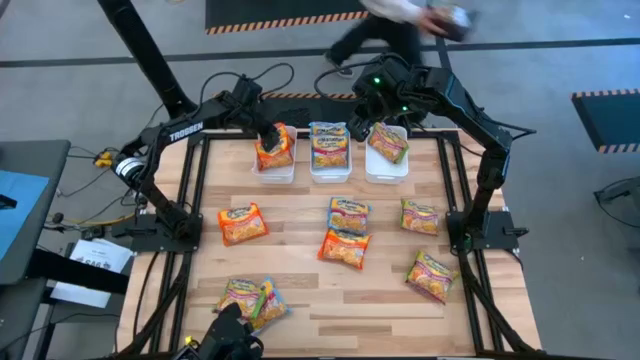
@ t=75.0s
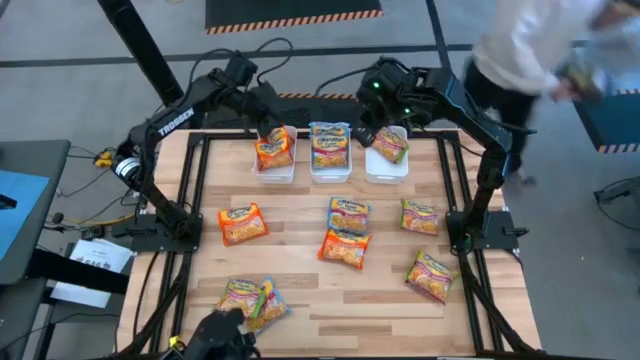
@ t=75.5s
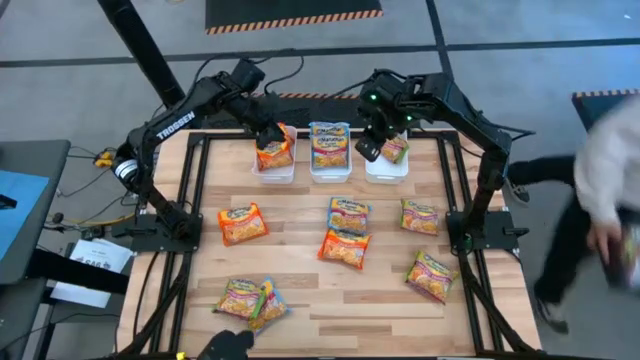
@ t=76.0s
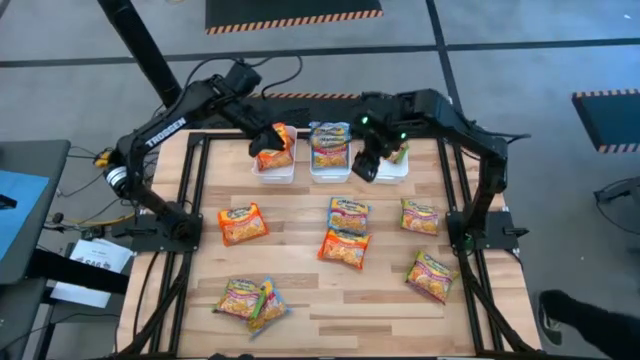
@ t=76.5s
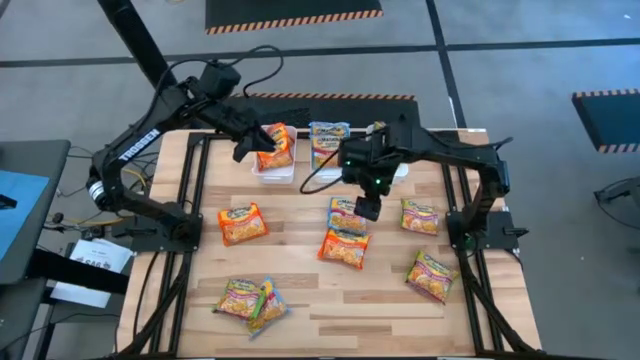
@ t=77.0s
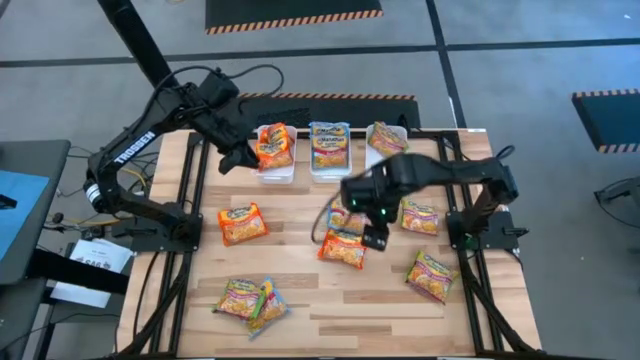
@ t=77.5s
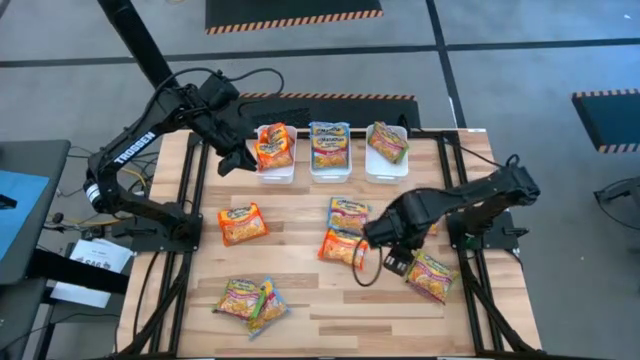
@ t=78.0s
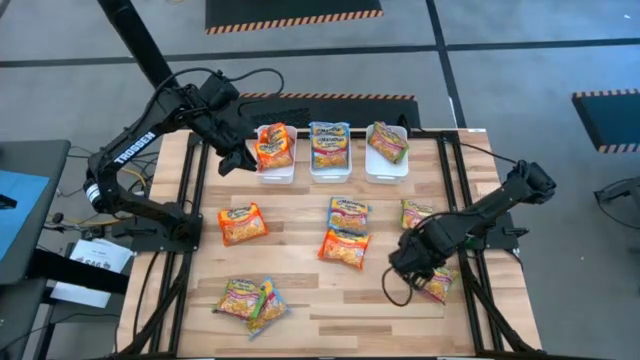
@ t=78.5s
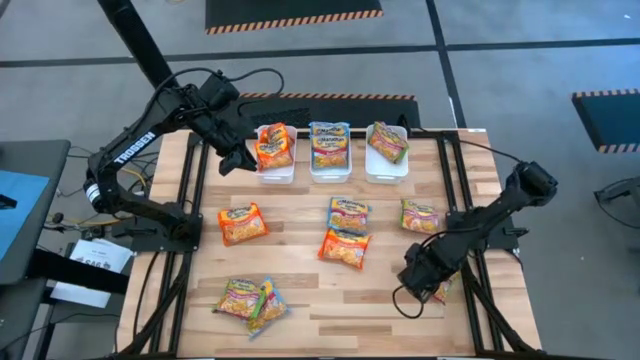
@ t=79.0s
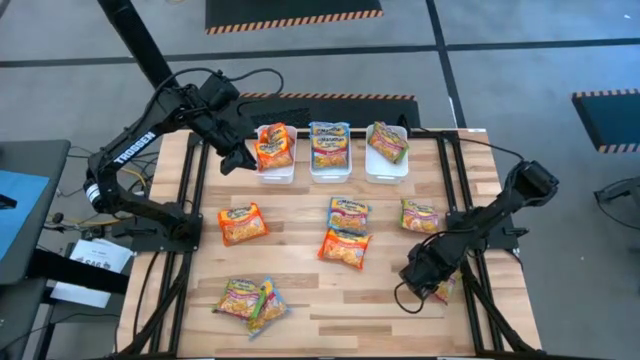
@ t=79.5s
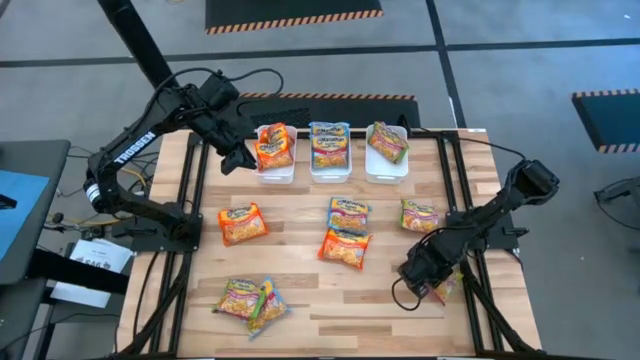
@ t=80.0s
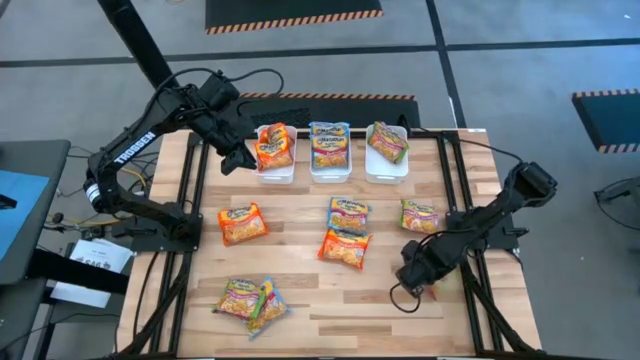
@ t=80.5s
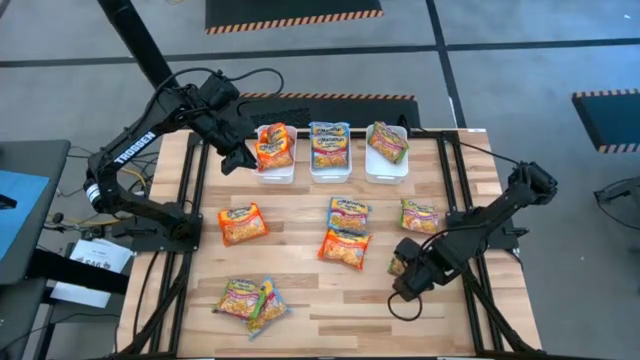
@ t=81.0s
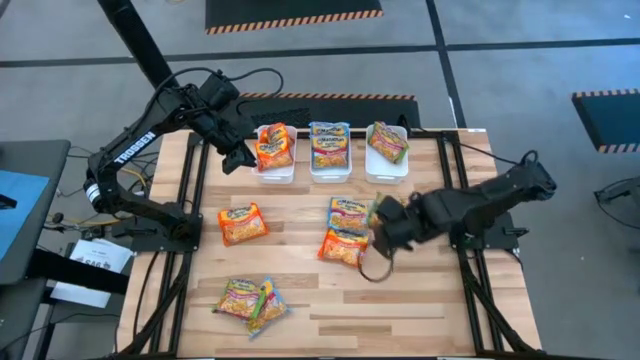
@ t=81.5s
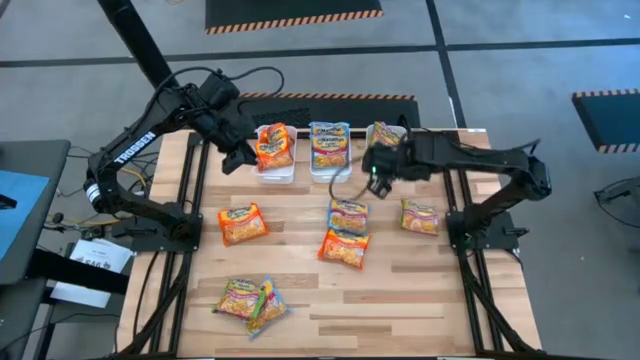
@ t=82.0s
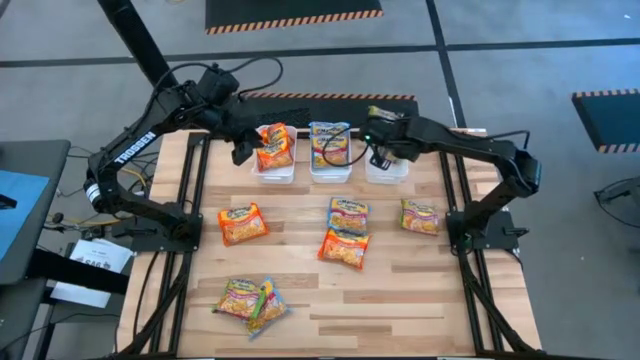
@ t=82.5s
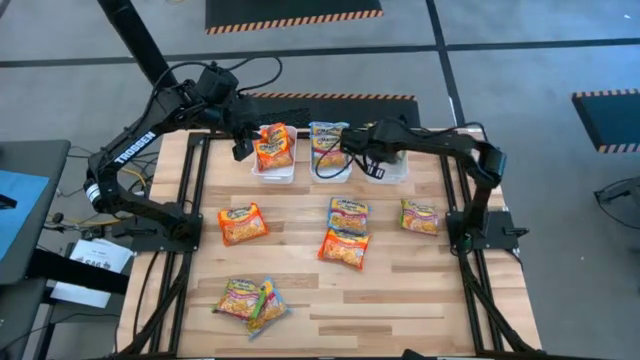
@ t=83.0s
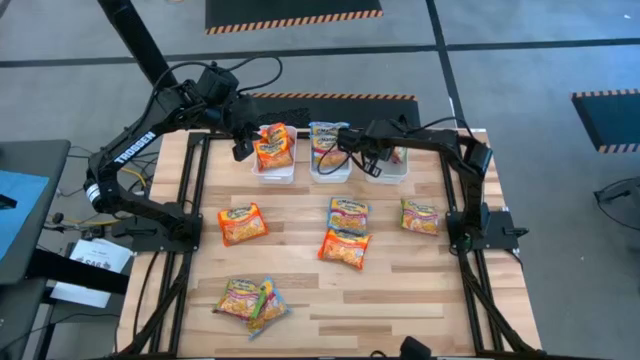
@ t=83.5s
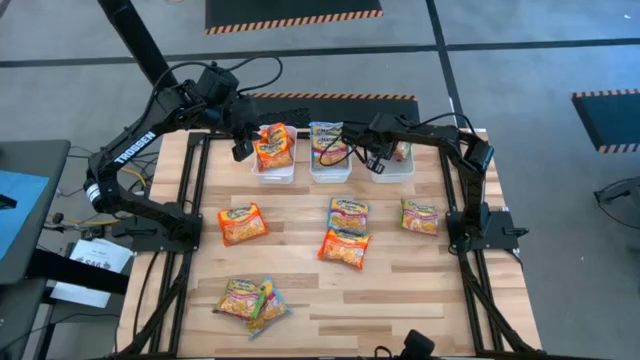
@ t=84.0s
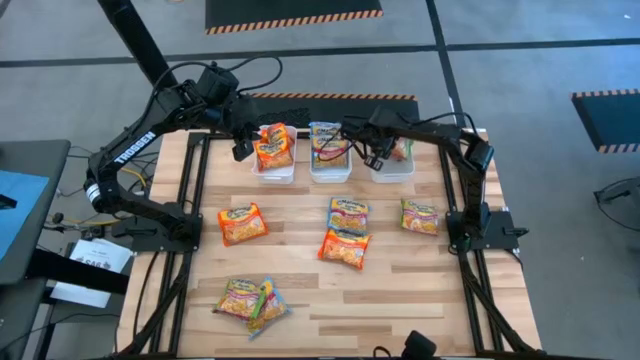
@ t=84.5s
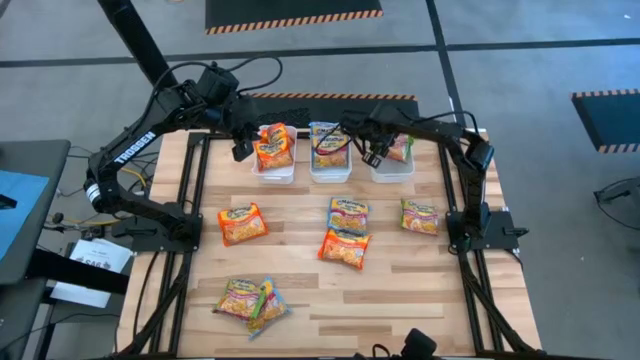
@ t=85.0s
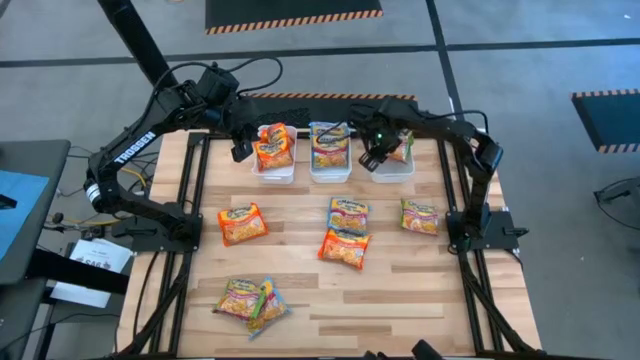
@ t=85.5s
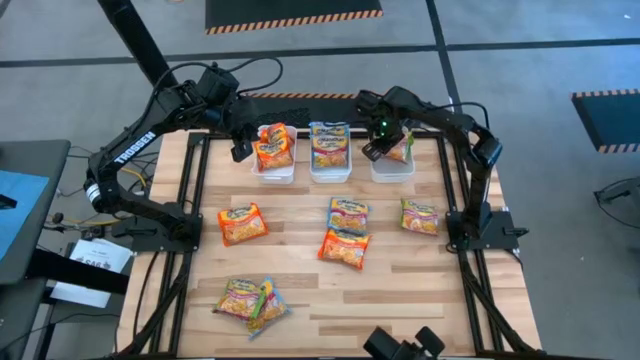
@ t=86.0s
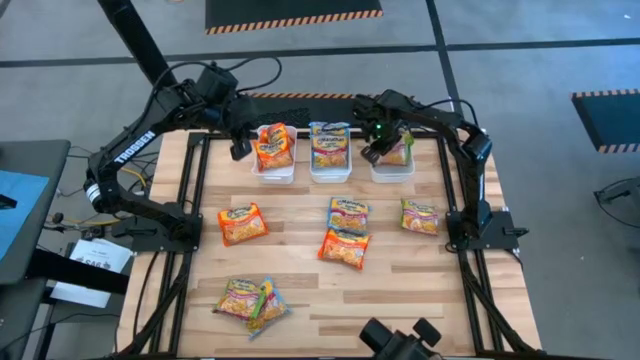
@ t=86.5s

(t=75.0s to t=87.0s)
Task: Sort Maruchan noodles
Put the green noodle pack into the right white bin

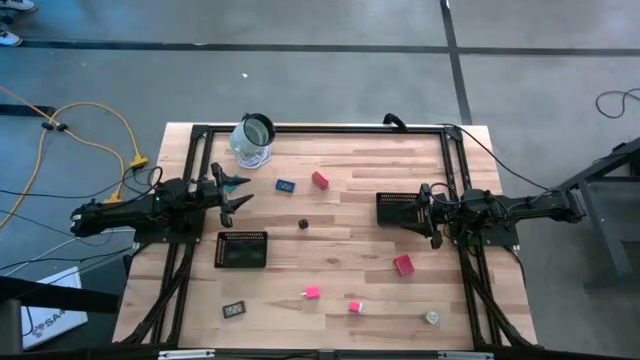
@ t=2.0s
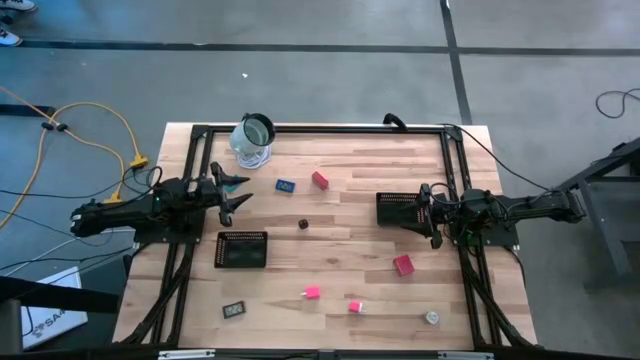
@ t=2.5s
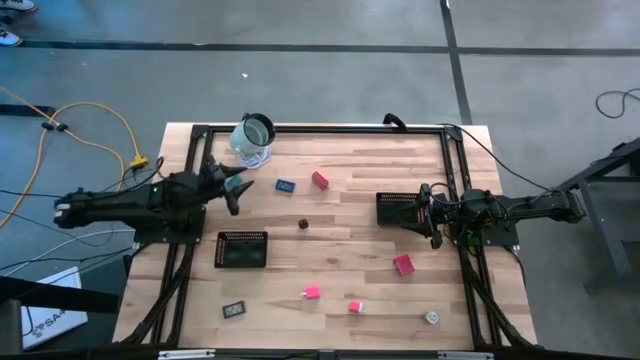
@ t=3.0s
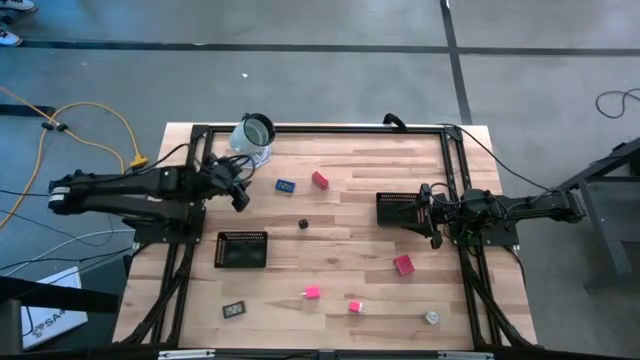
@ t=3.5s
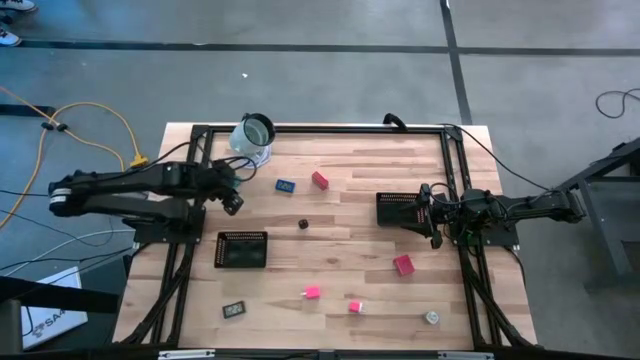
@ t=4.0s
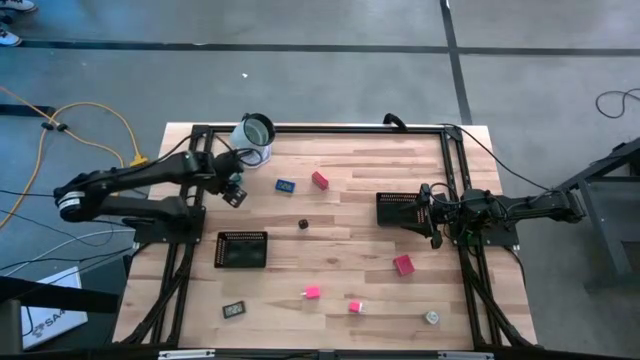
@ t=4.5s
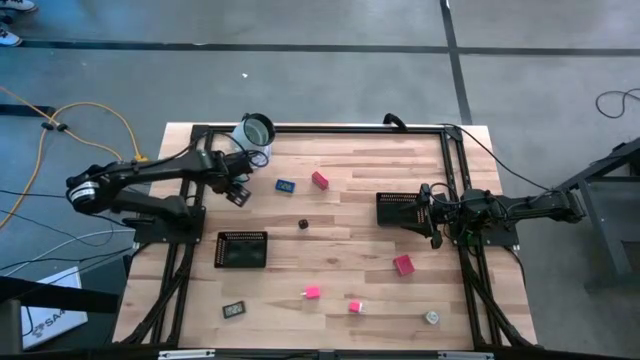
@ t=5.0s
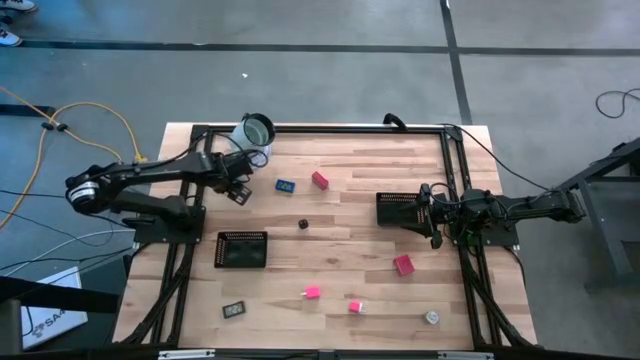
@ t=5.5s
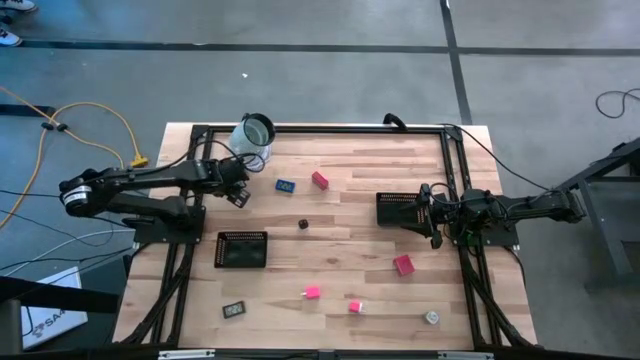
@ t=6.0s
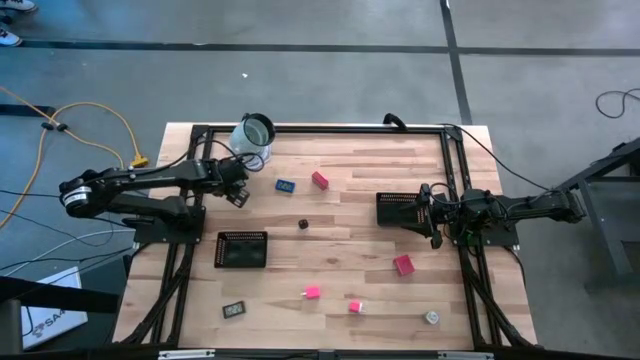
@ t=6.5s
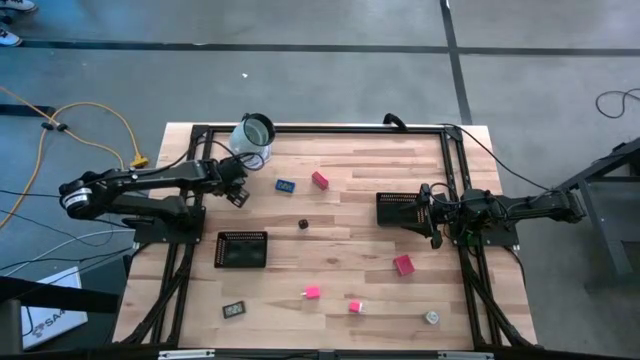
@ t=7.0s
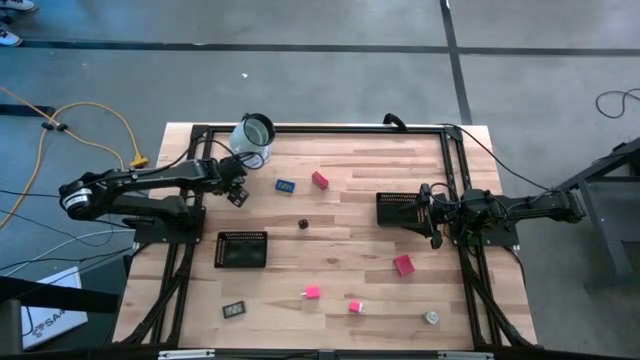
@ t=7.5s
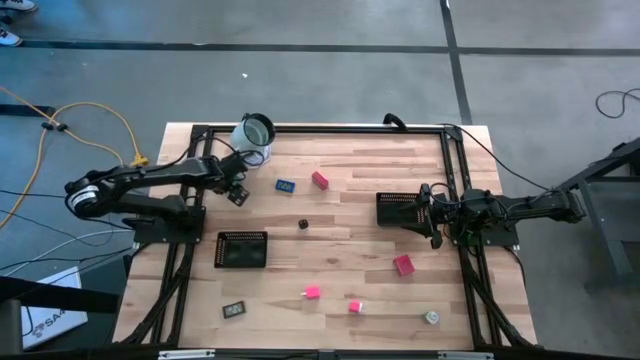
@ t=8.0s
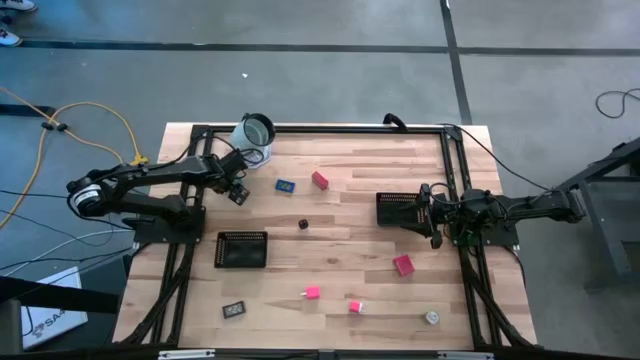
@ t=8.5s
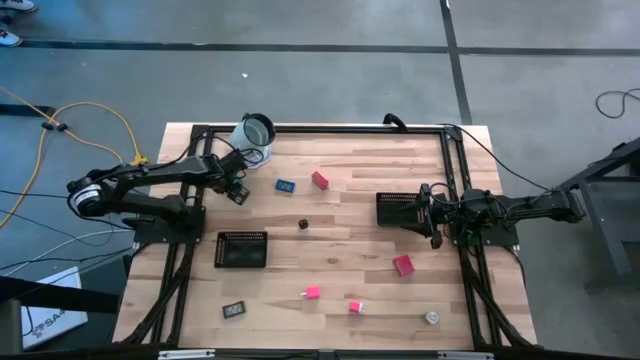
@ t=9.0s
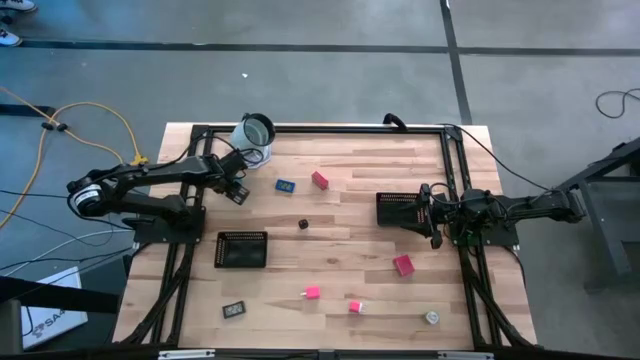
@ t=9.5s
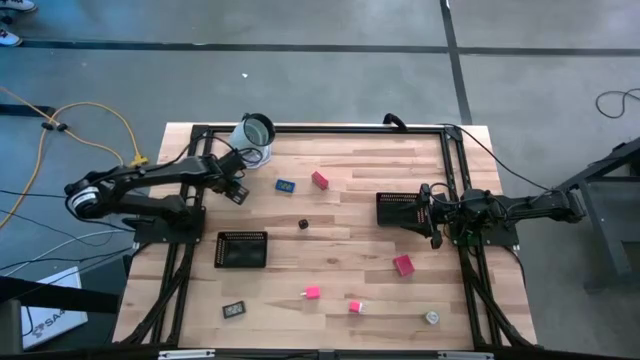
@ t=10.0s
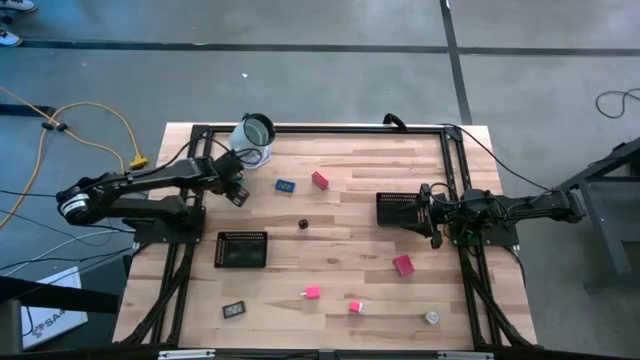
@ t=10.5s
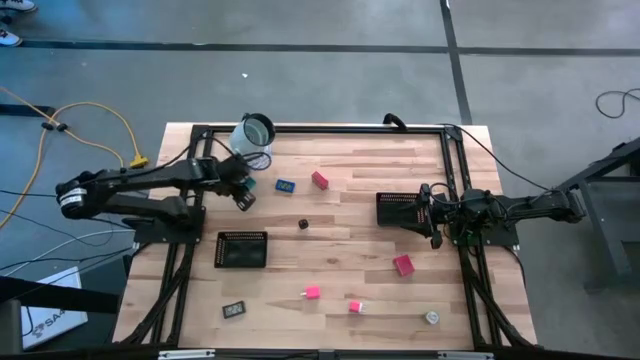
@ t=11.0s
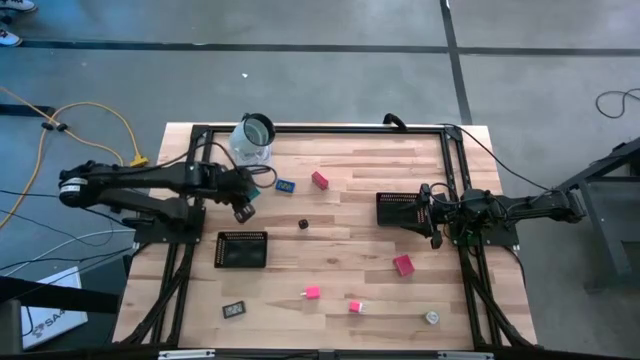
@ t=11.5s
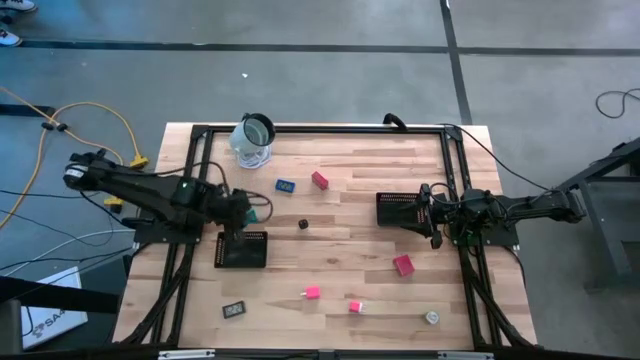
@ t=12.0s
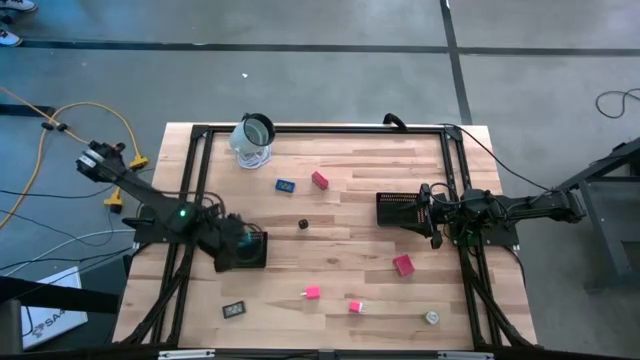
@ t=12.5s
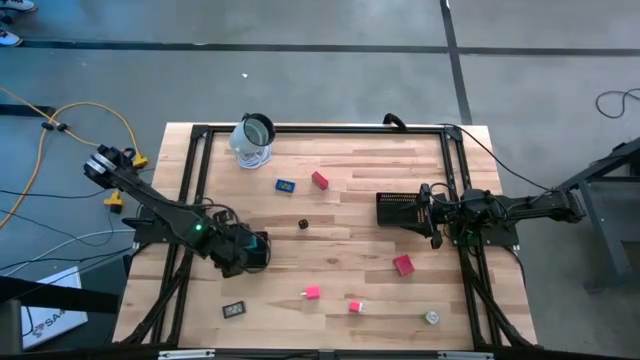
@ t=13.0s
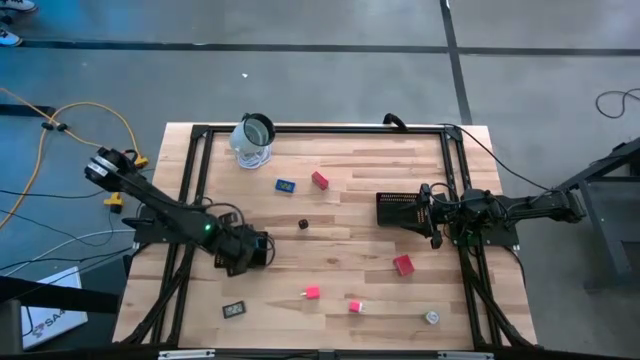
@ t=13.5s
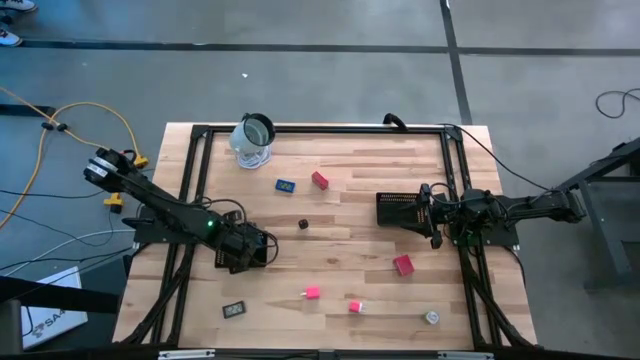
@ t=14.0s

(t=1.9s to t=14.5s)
Task: Pick & Place Office items
Put the light blue digital timer into the left black bin
